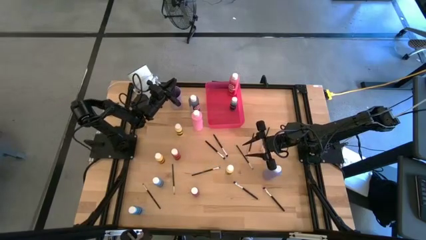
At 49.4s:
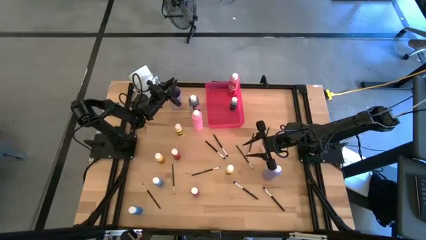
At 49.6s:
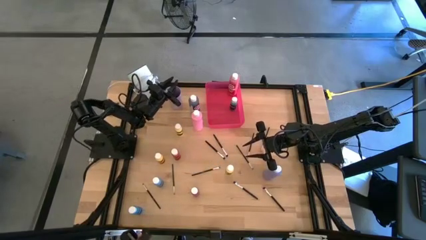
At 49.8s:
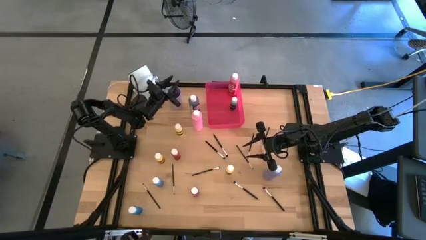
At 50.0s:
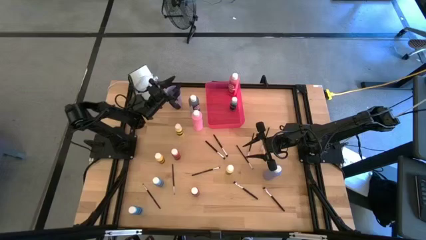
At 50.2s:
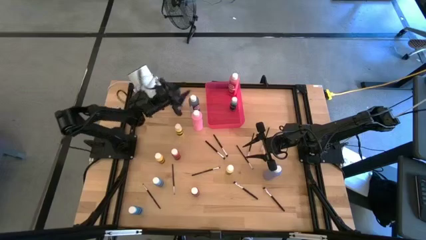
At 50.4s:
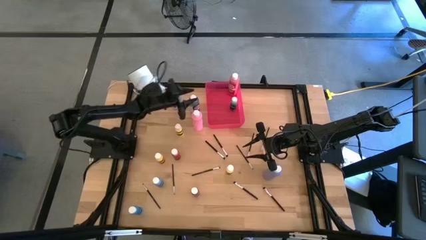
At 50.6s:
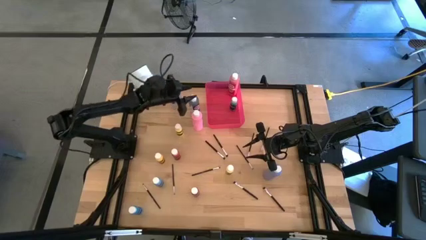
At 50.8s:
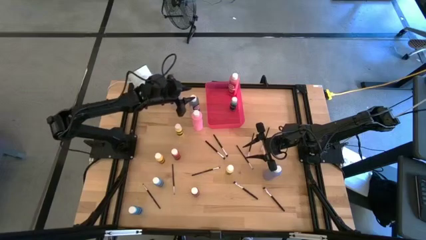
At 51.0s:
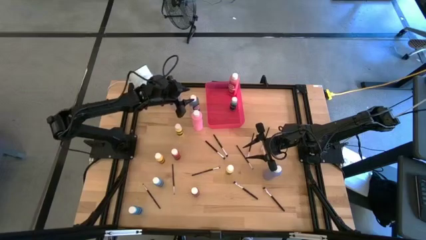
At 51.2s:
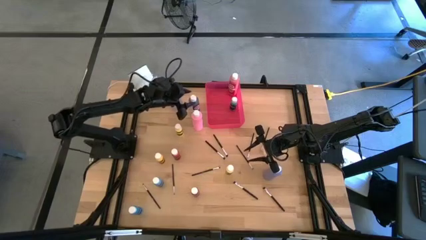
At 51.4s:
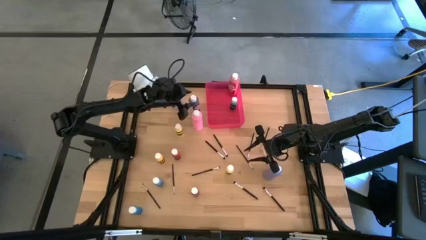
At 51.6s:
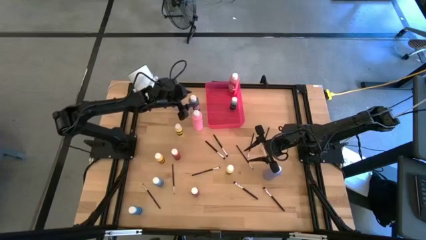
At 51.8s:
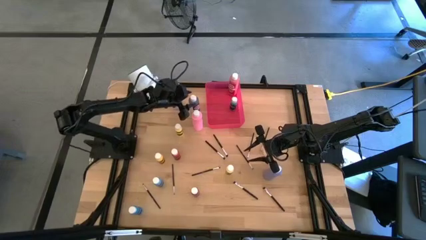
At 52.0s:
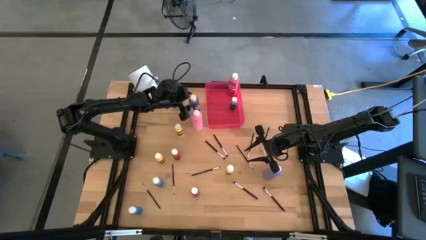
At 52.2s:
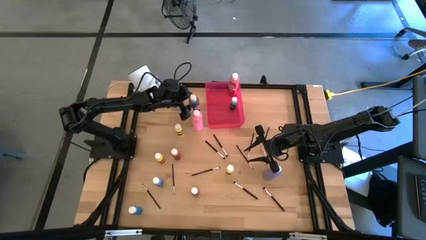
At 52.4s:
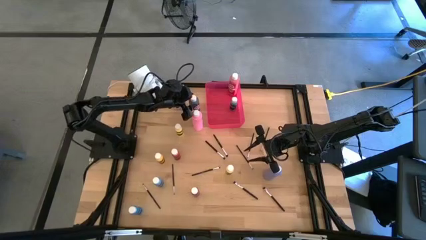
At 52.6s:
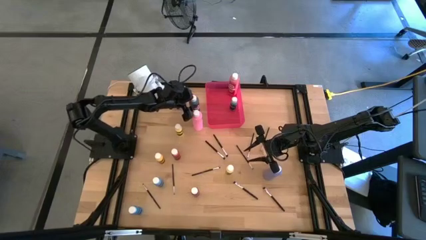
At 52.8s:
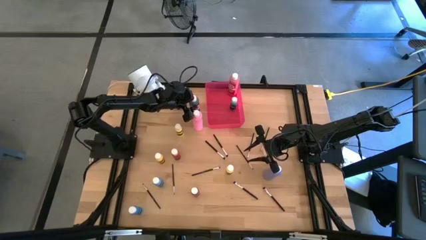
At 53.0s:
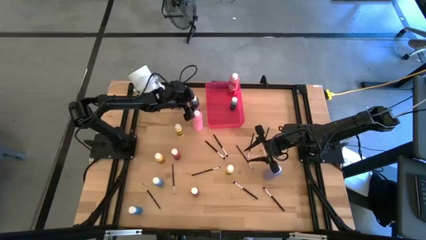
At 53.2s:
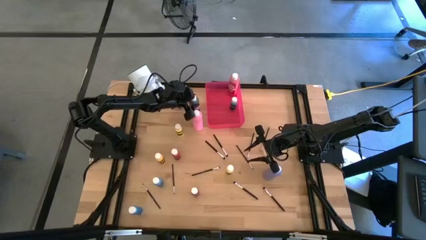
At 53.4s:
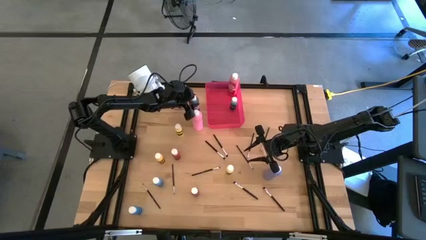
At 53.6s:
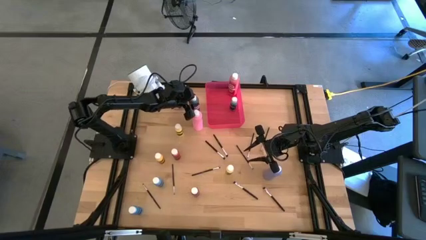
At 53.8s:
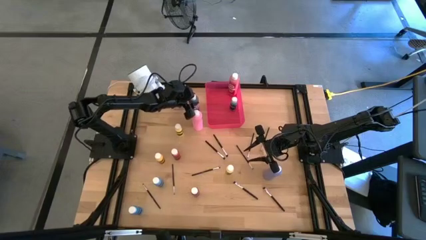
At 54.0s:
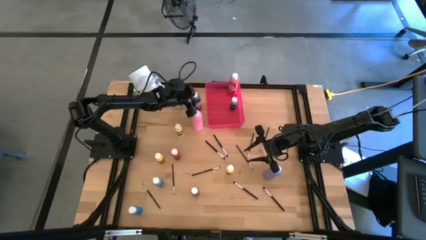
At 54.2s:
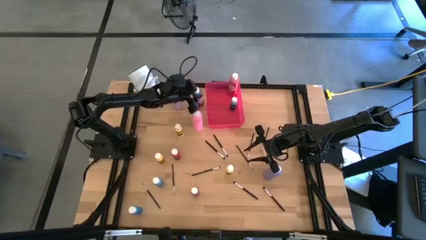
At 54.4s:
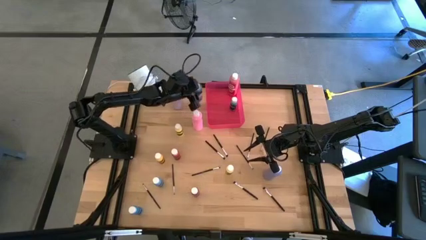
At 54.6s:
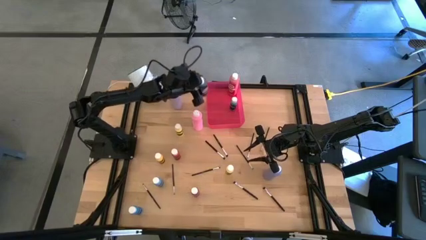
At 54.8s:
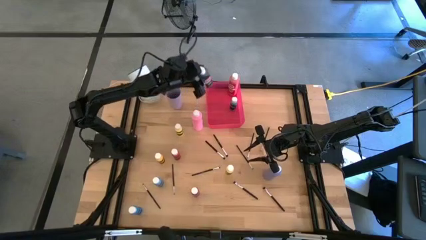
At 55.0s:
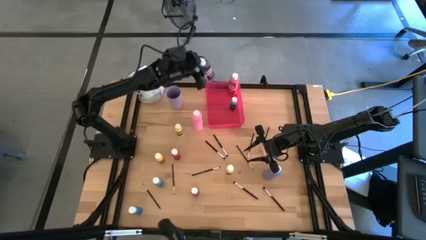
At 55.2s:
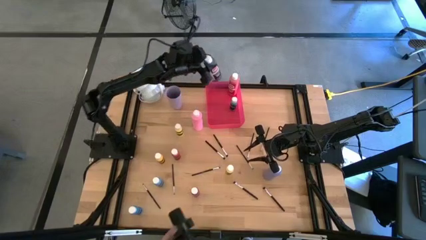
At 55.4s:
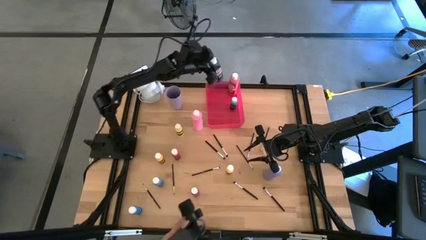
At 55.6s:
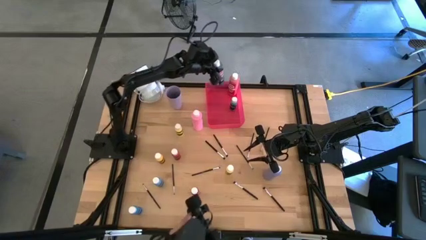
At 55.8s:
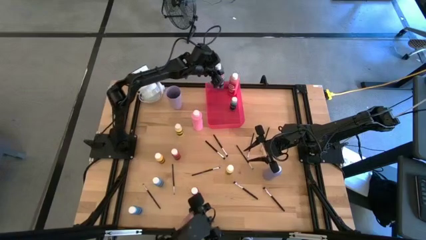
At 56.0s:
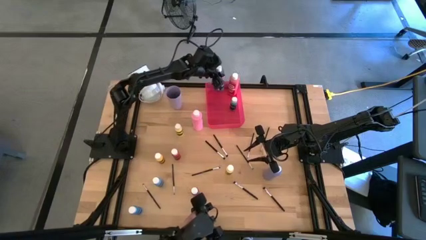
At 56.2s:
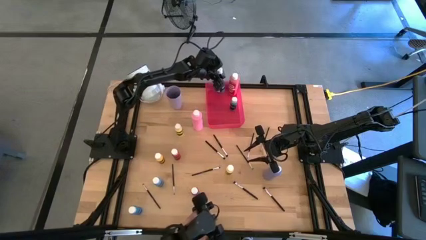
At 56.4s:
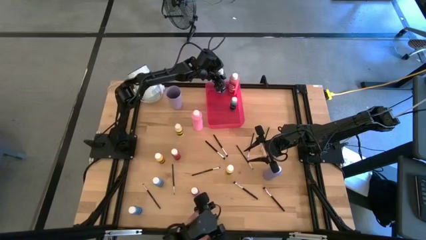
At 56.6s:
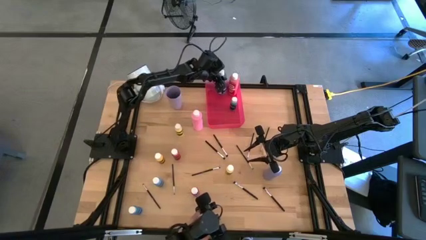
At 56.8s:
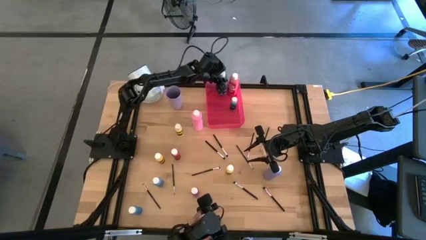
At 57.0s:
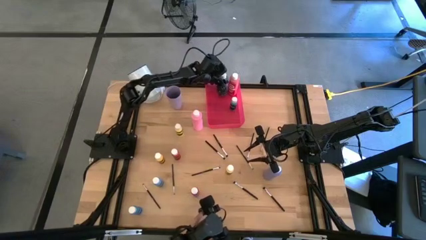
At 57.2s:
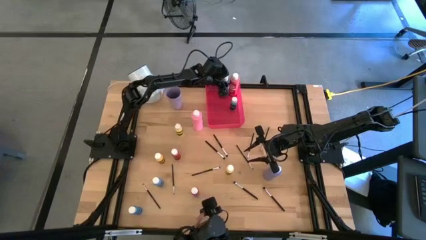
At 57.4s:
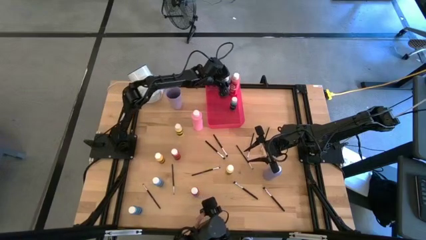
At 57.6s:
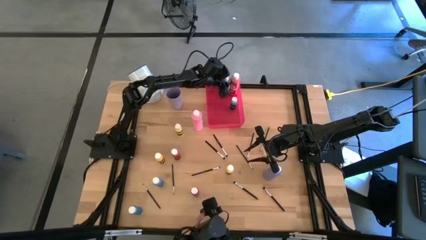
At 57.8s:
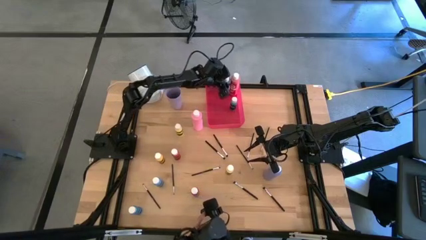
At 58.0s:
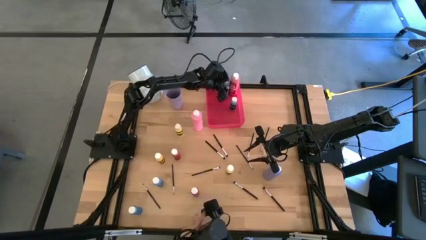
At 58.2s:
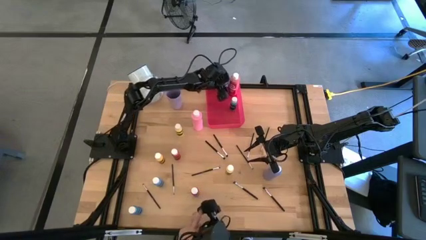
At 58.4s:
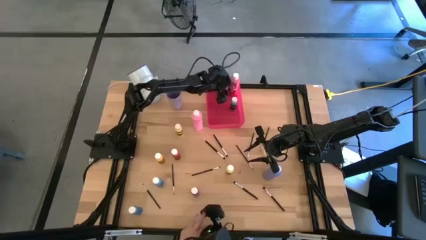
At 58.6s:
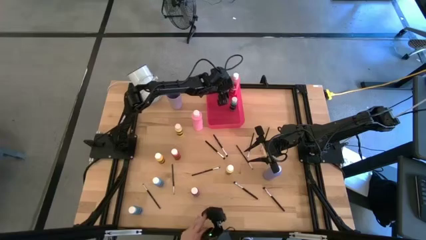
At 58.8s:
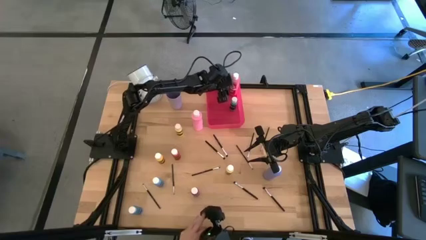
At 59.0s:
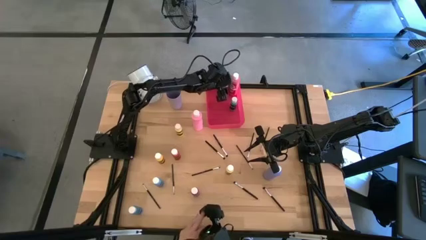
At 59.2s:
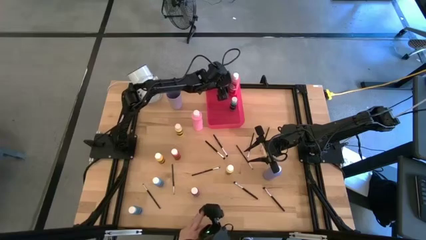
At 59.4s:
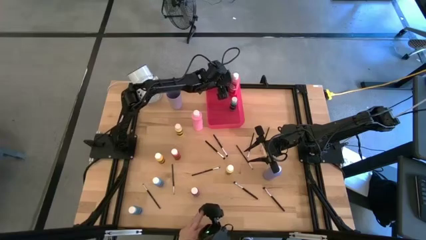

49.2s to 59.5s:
Task: Pick & Place Paint Supplies
Put the black paint bottle into the red bin

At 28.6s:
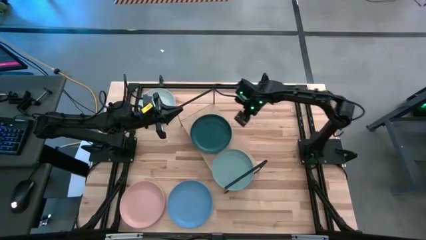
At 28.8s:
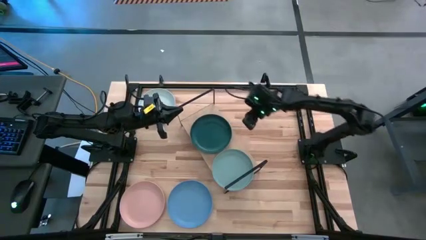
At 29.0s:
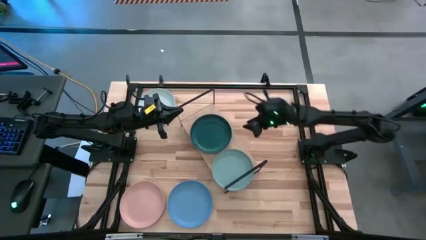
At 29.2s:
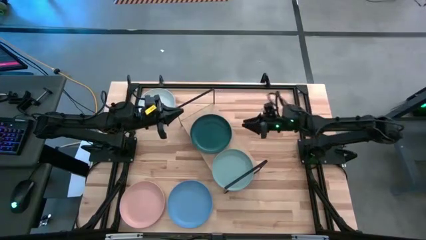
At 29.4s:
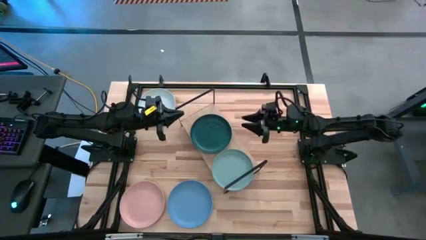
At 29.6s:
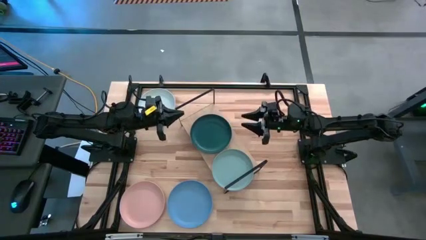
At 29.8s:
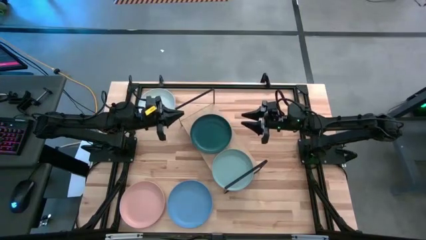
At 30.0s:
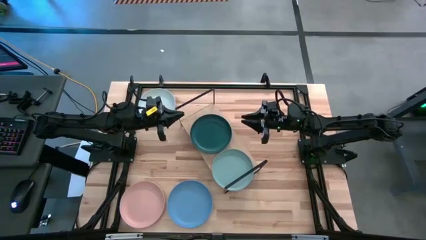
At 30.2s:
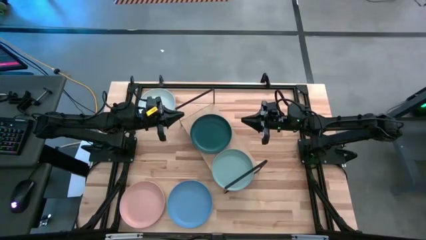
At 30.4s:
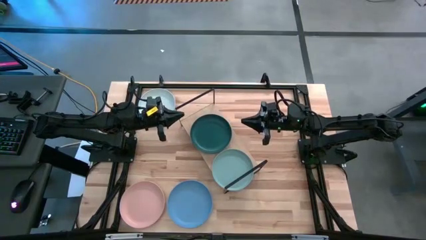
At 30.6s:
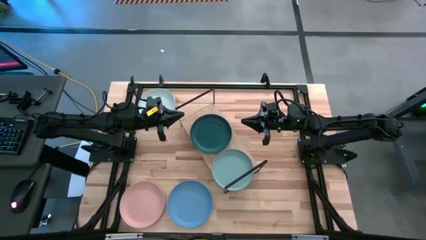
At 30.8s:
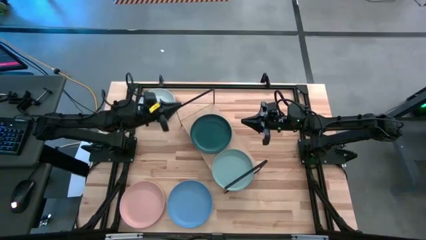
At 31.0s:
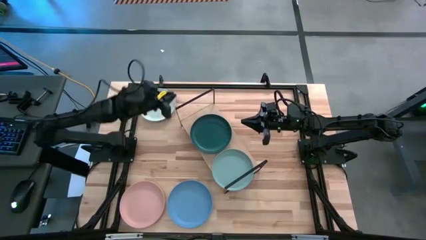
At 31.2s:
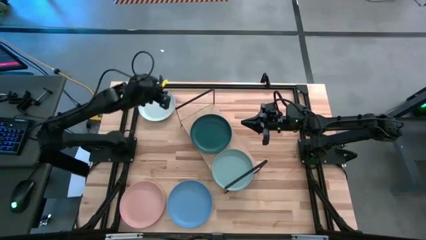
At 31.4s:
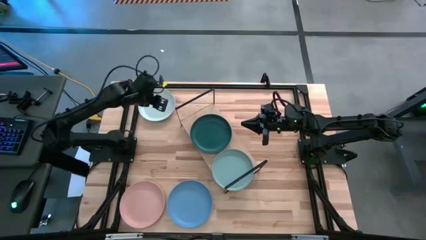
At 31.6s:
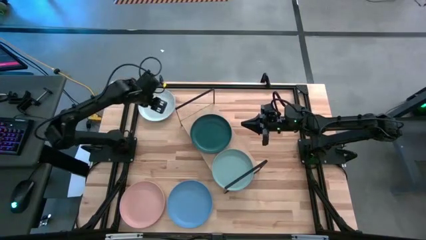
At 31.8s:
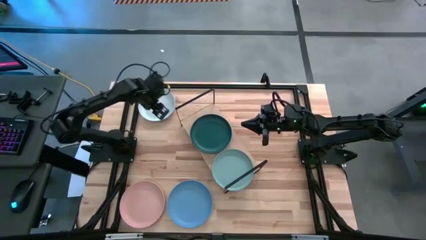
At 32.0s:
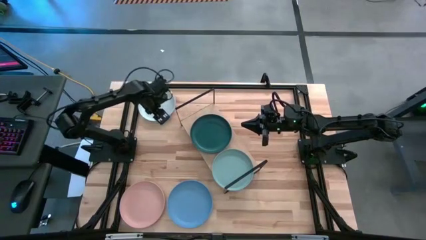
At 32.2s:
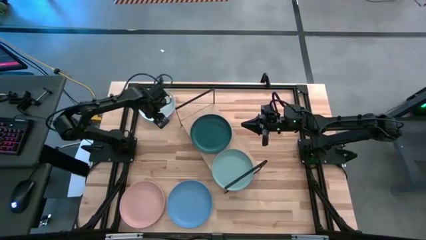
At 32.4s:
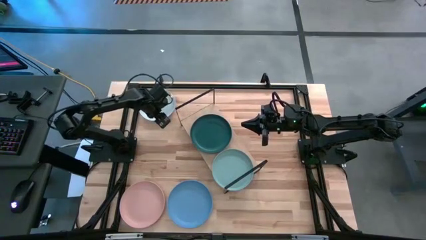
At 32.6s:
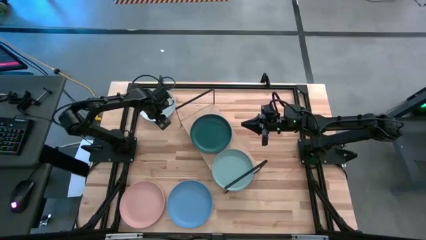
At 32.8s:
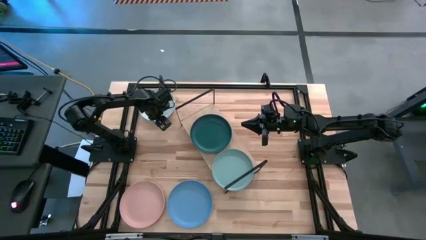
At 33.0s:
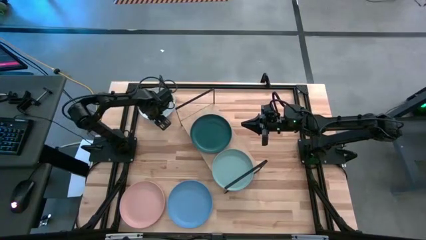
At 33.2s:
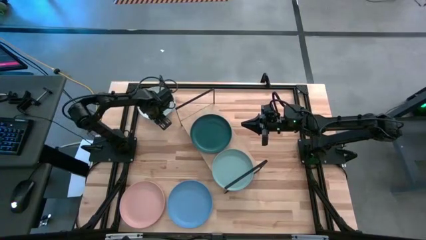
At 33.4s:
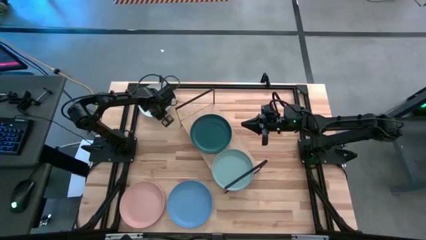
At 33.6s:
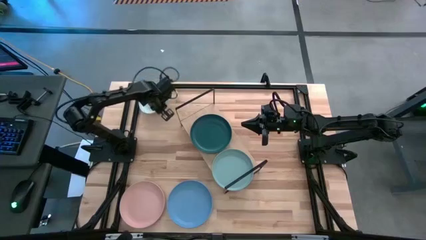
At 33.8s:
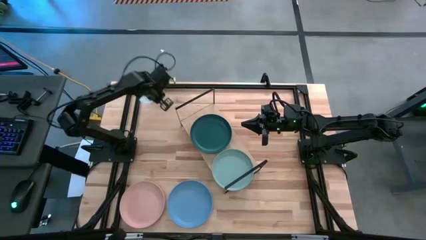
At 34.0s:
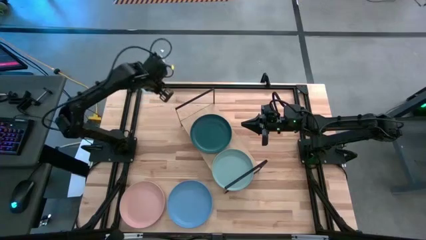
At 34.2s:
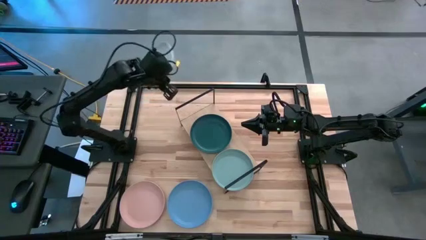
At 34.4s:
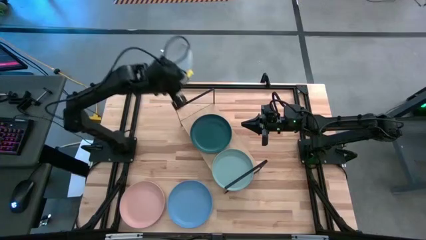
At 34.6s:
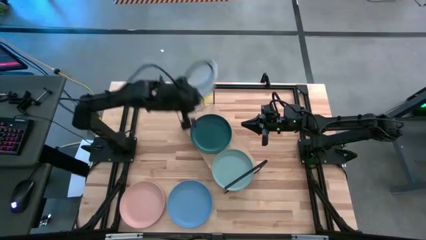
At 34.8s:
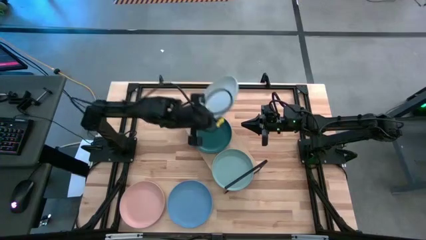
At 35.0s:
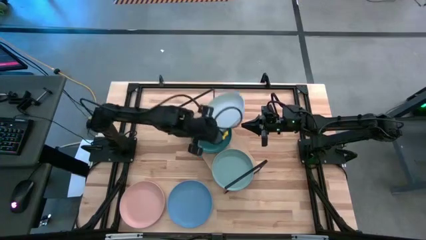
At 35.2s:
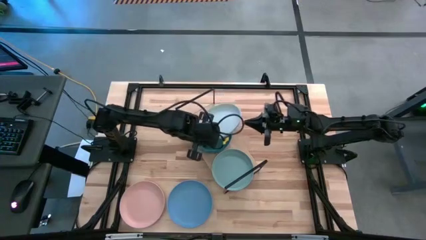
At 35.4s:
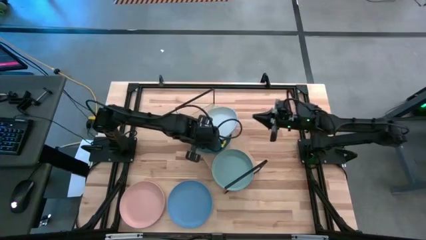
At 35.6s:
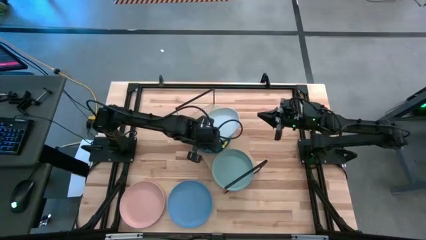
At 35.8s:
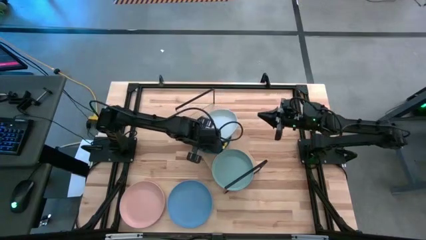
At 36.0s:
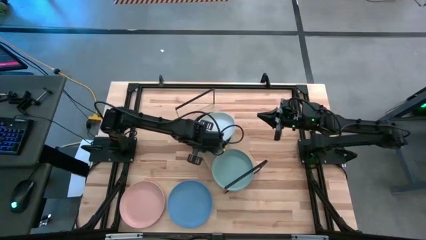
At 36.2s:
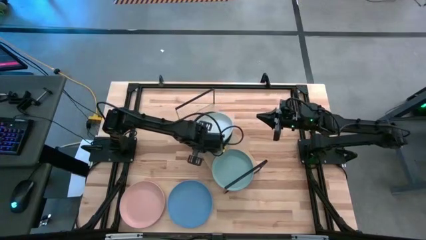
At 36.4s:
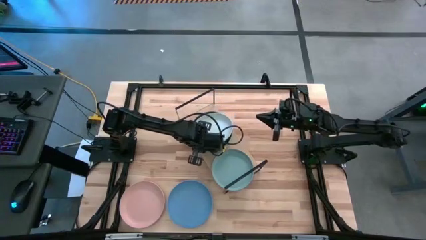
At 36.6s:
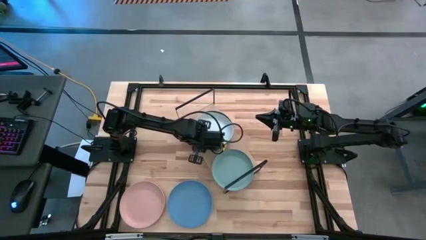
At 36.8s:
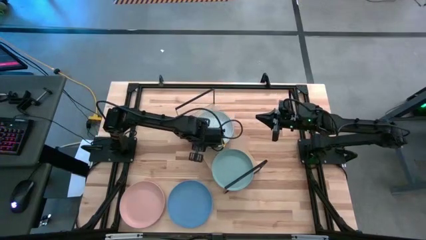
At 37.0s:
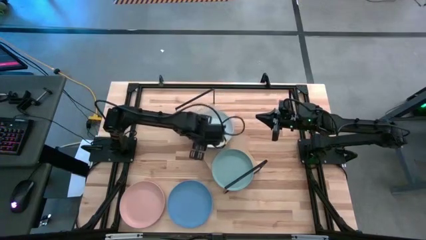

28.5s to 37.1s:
Task: Place and stack plates onto a shelf
Stack the gray plate on top of the green plate on the shelf
